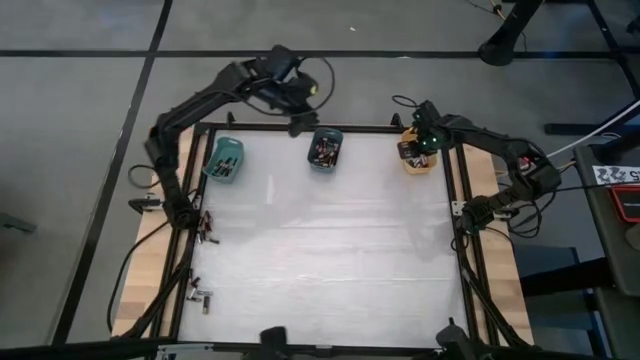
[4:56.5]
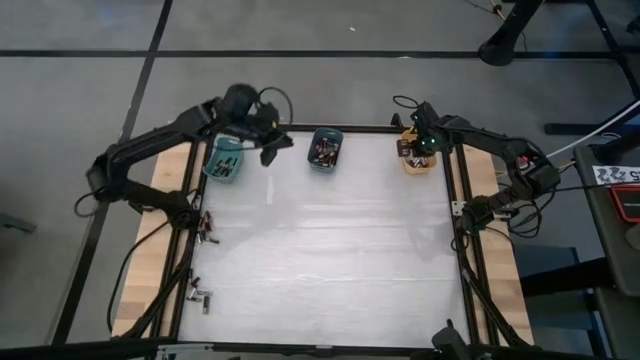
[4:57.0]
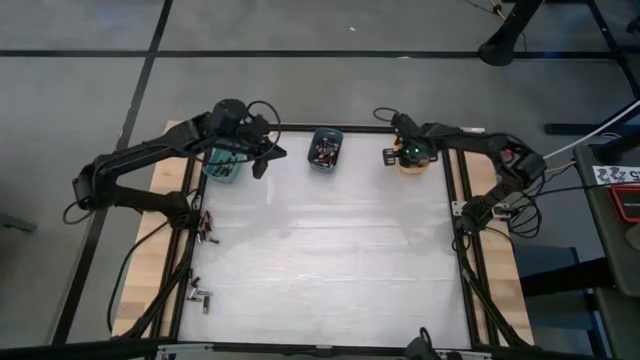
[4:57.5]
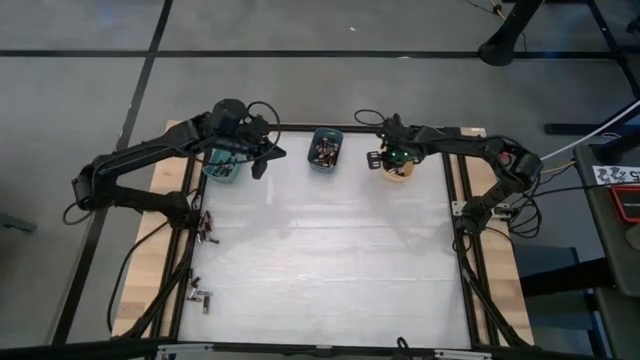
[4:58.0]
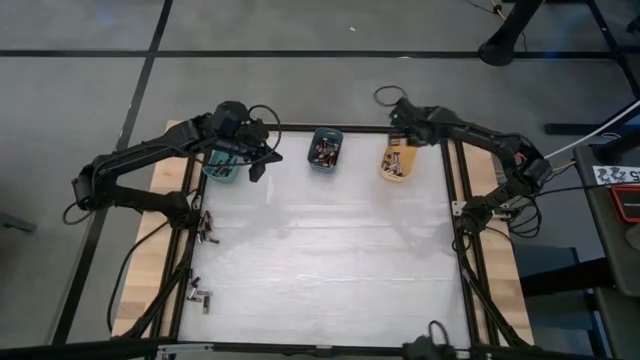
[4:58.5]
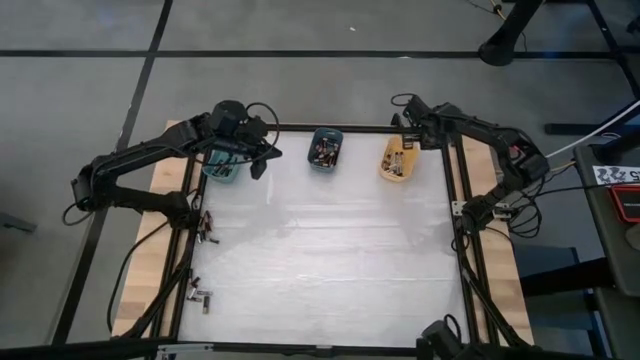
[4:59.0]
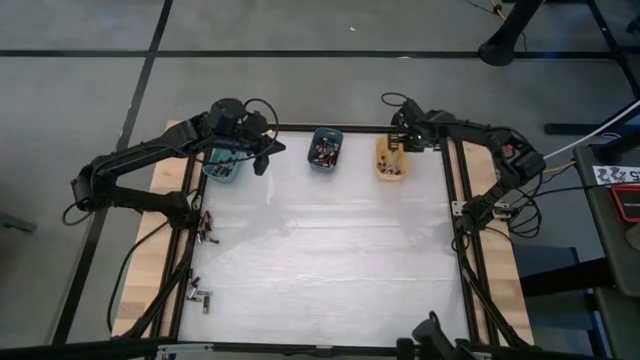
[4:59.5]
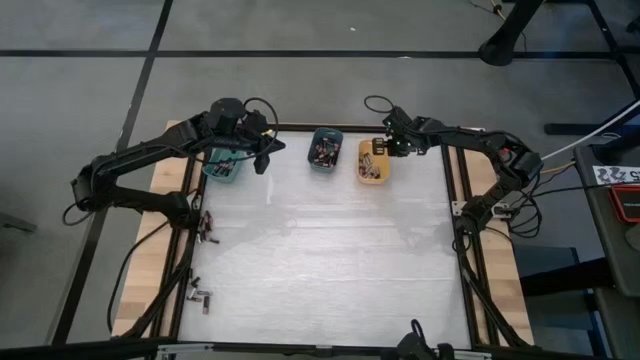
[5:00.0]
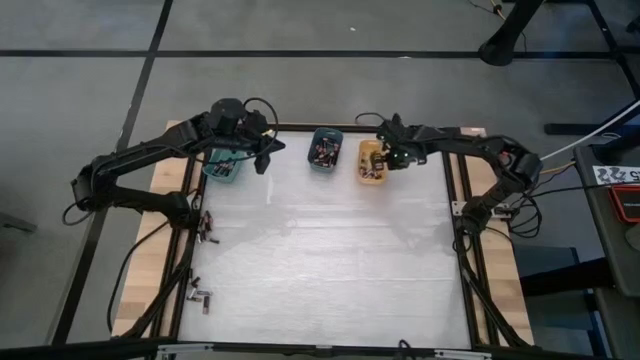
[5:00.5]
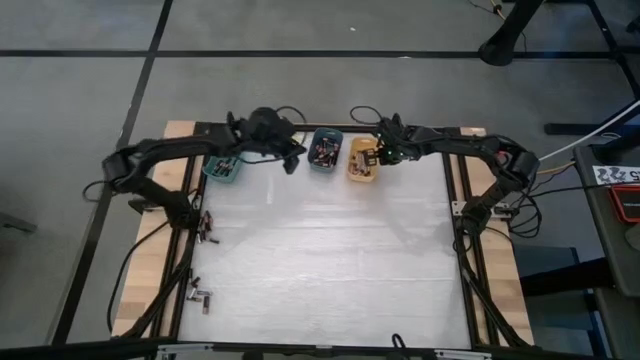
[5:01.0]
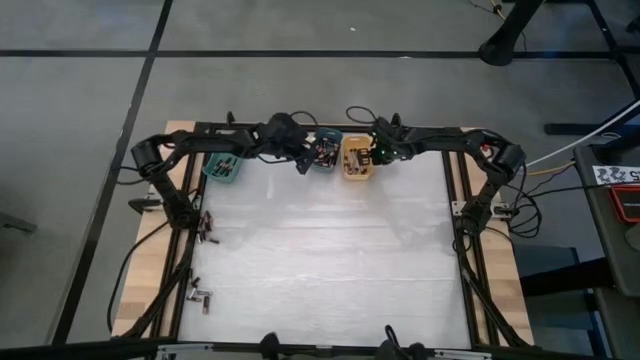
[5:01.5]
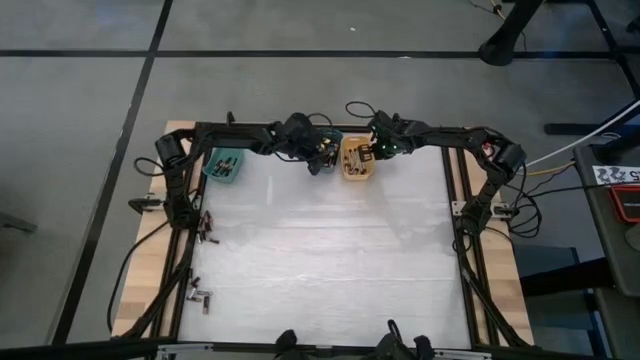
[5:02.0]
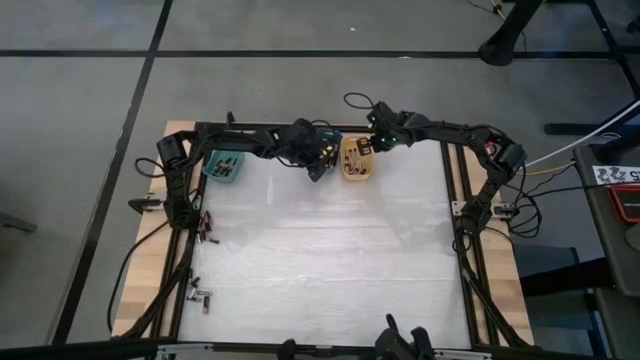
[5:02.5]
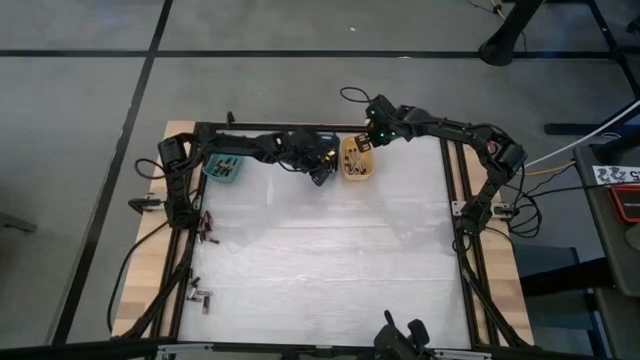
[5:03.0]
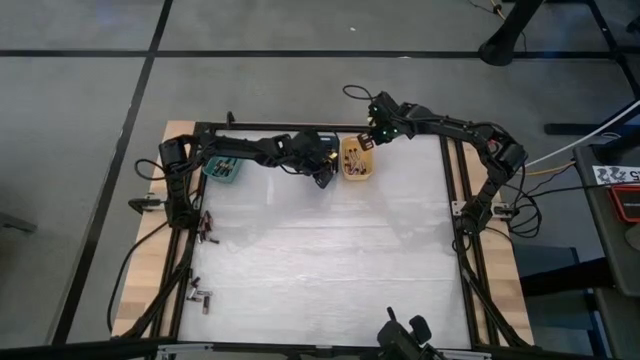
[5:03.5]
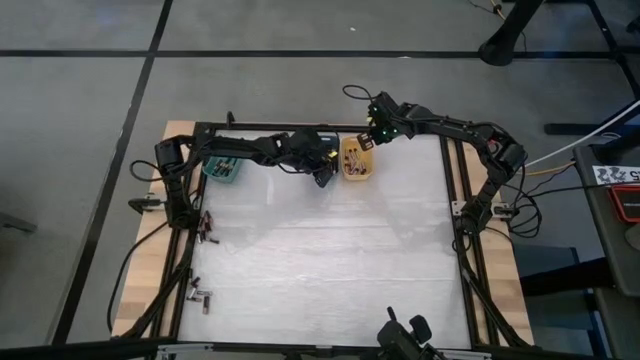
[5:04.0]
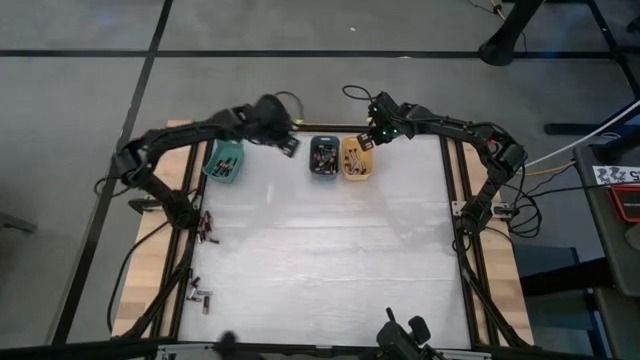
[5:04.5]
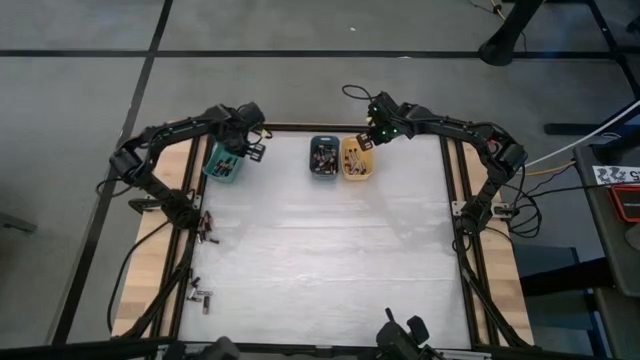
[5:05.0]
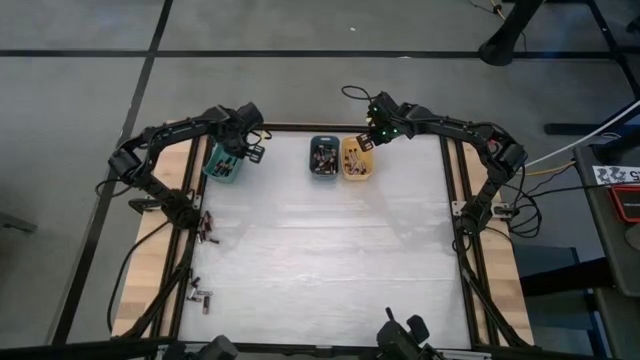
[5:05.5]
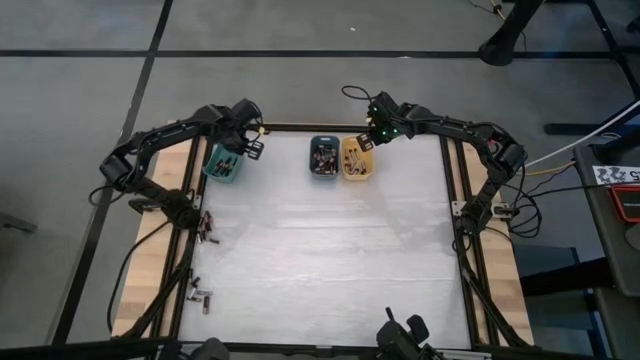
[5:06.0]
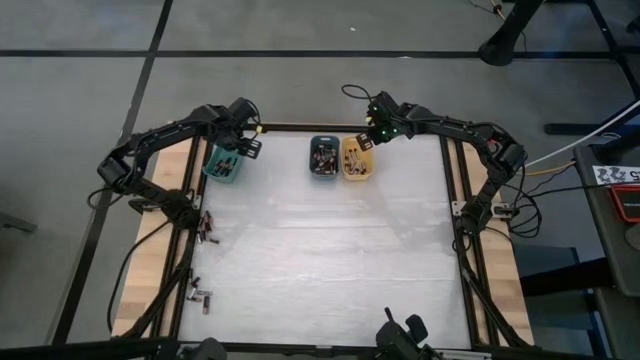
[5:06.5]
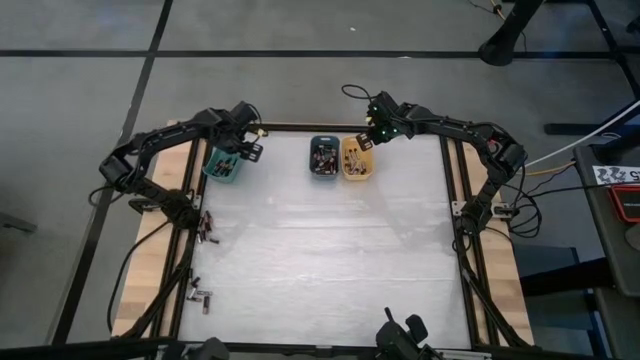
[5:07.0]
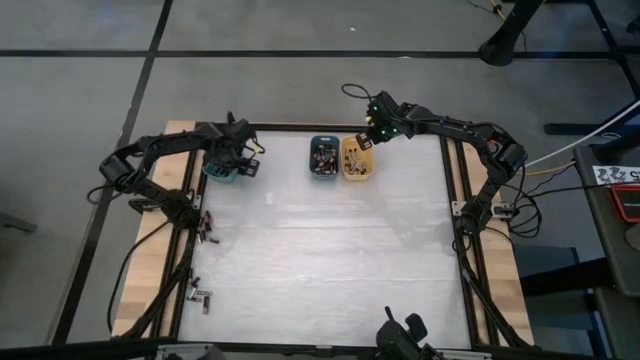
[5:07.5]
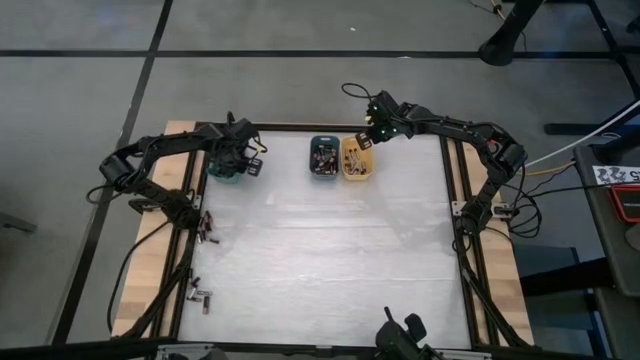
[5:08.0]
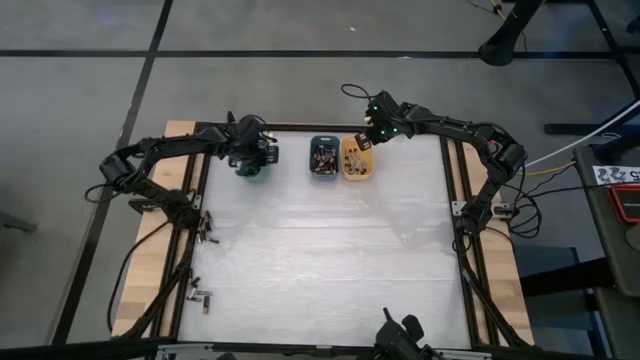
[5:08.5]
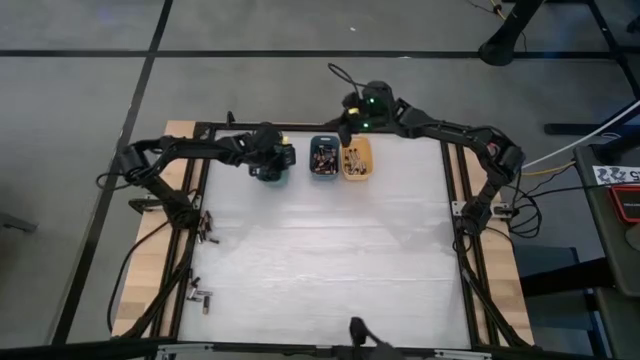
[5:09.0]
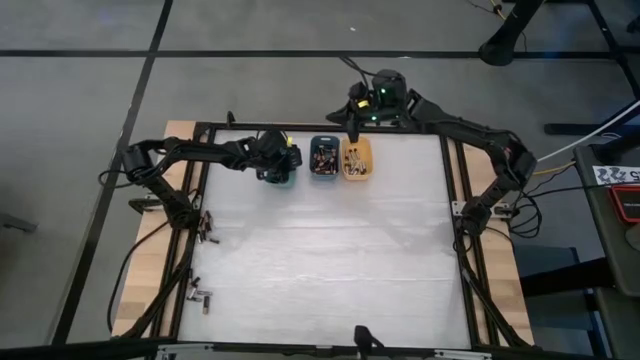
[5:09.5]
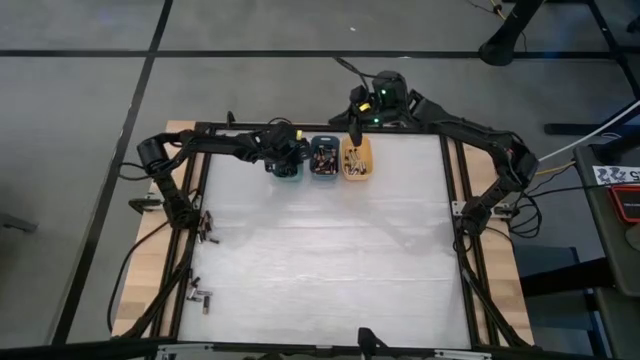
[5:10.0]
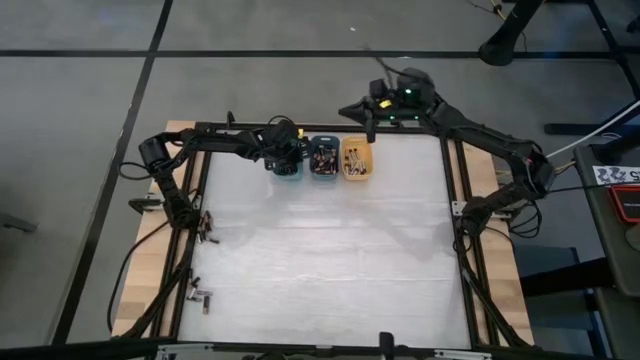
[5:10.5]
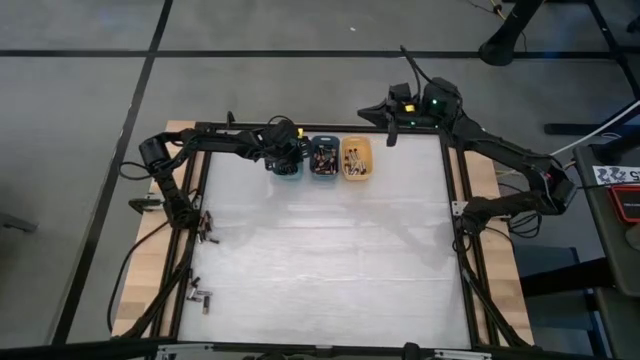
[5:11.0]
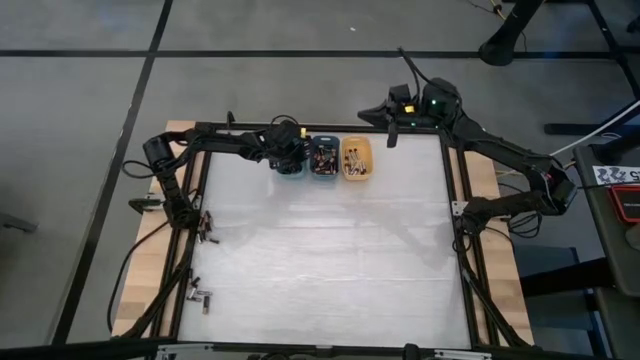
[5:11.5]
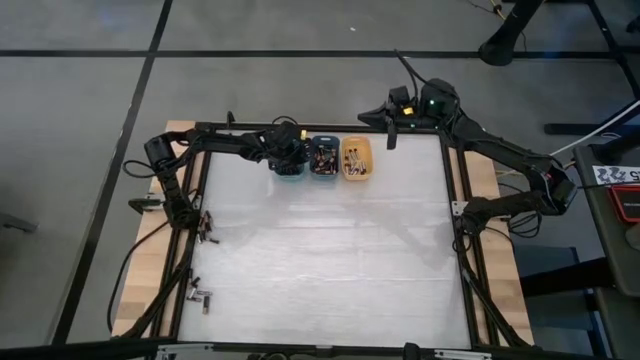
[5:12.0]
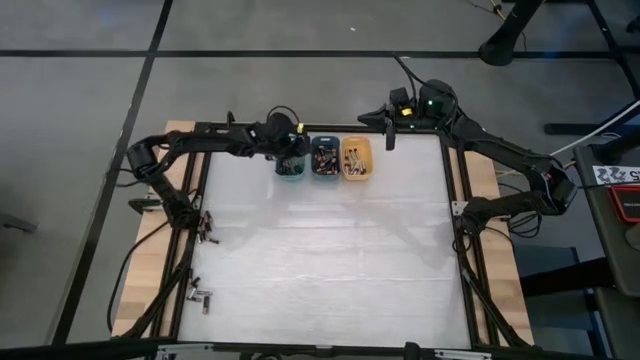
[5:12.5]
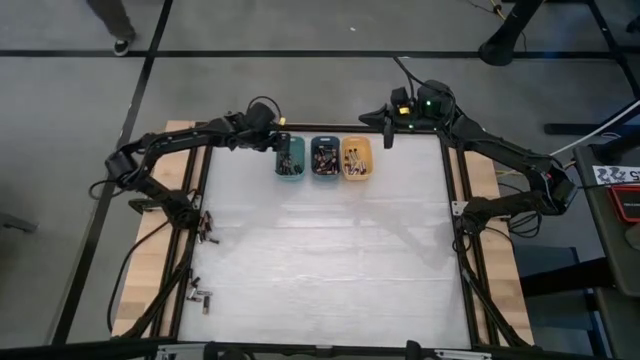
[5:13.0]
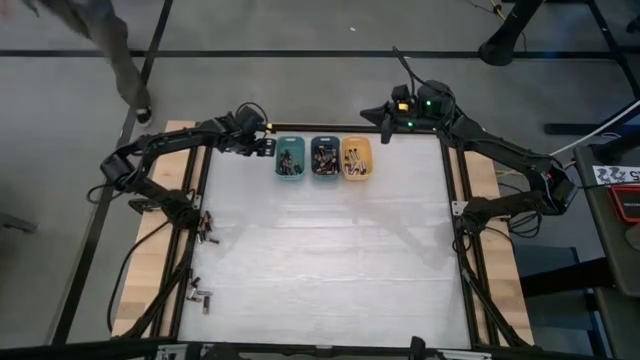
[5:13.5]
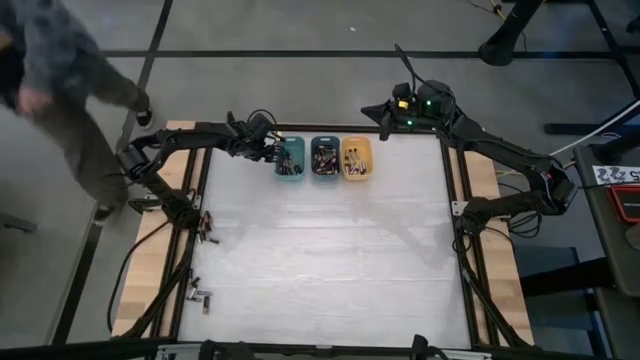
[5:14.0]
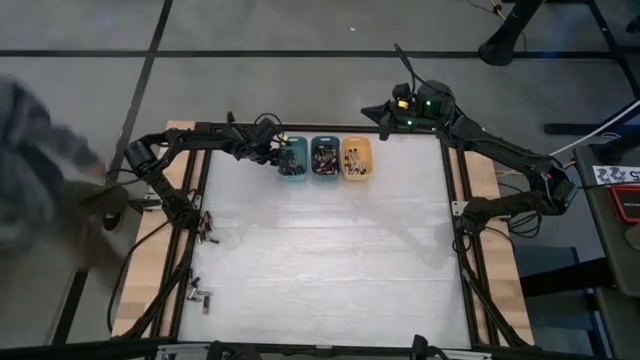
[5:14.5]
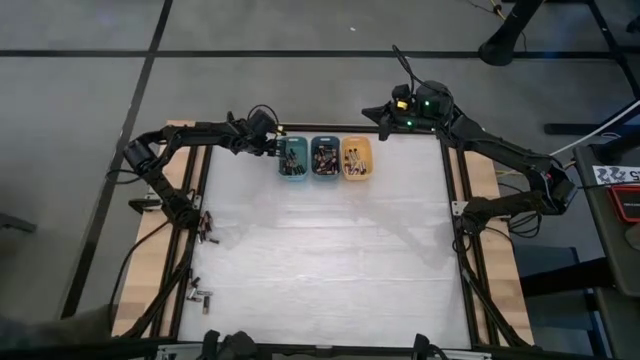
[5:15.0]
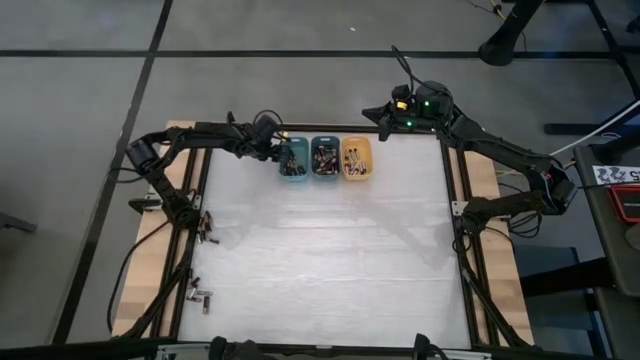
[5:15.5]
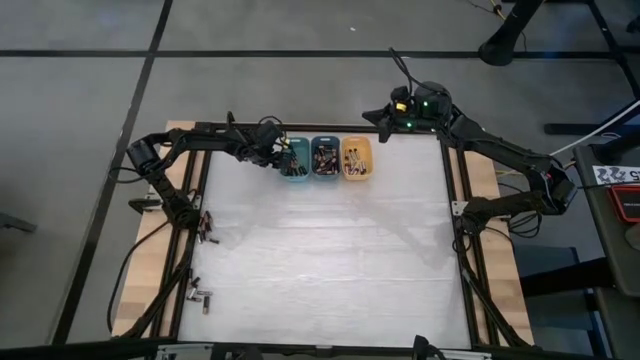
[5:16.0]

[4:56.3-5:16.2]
Task: Sort batteries
Adjust the bins
